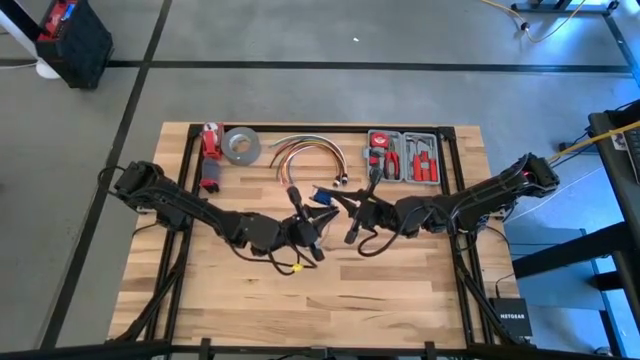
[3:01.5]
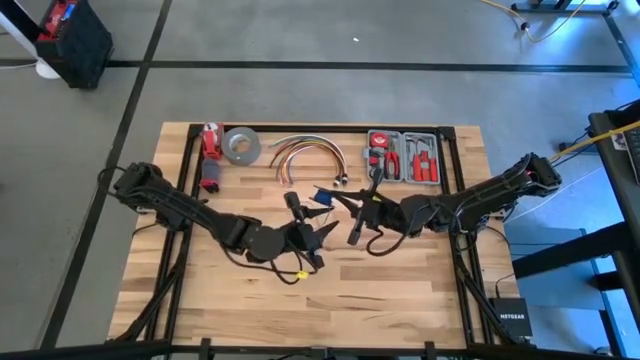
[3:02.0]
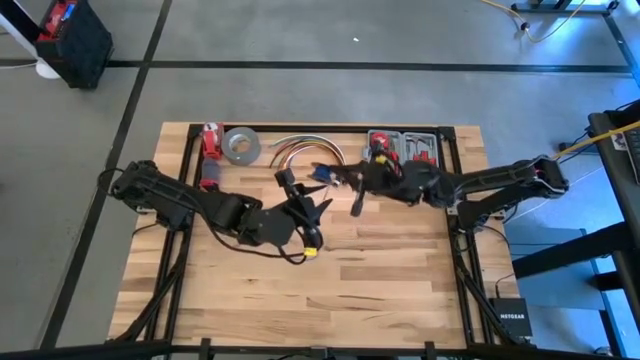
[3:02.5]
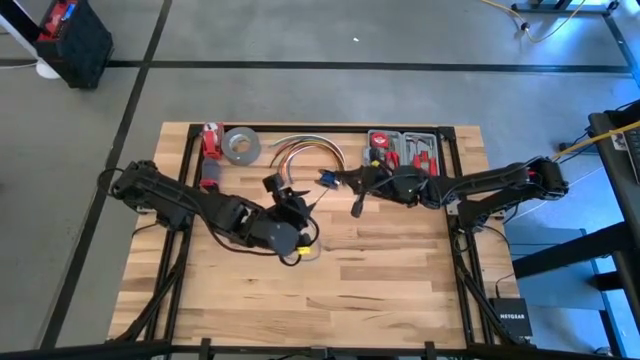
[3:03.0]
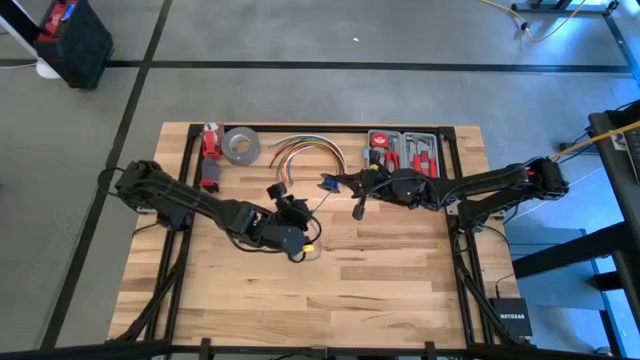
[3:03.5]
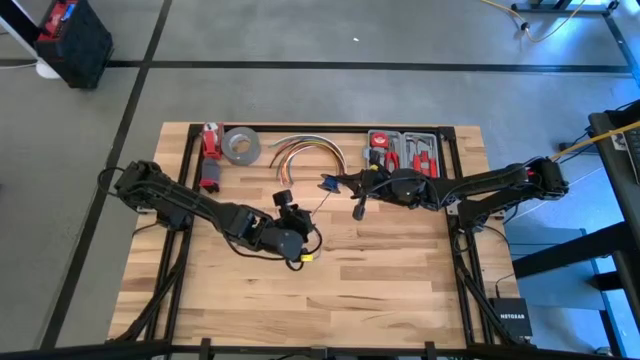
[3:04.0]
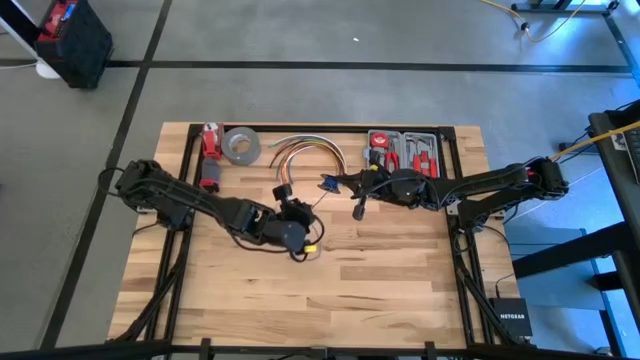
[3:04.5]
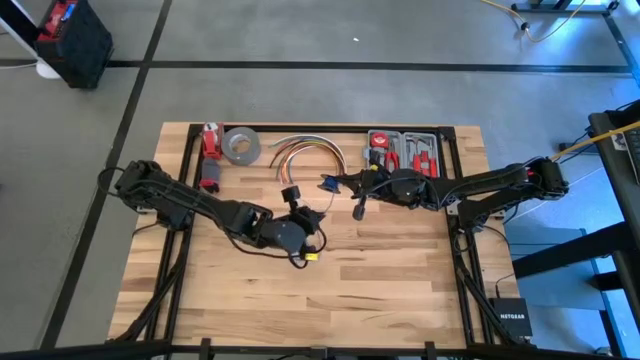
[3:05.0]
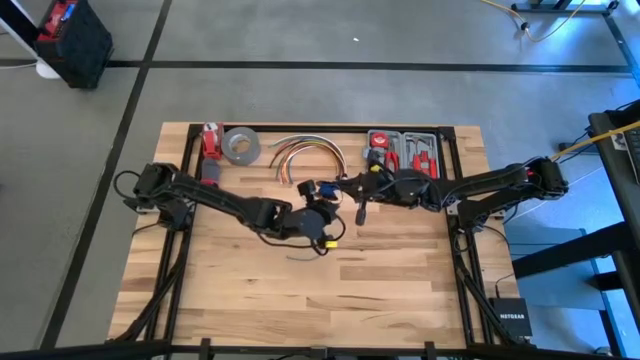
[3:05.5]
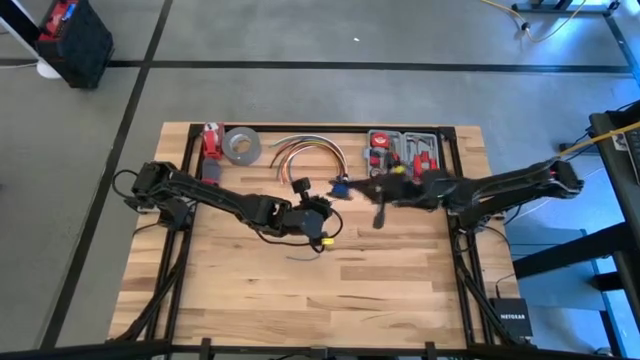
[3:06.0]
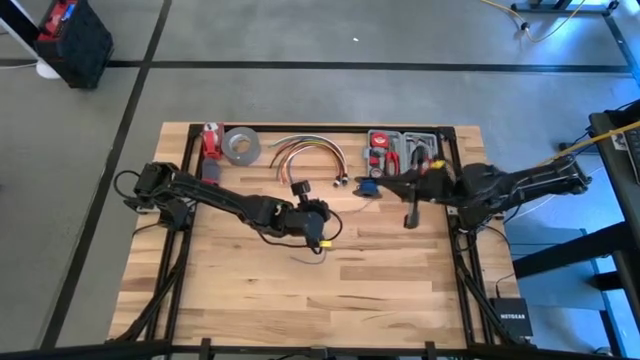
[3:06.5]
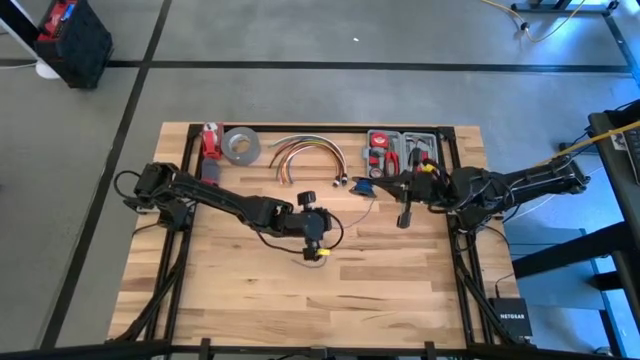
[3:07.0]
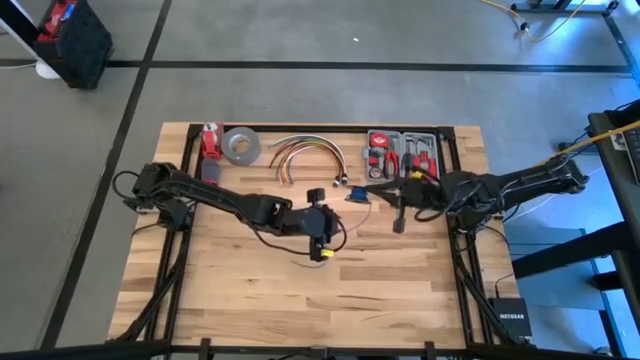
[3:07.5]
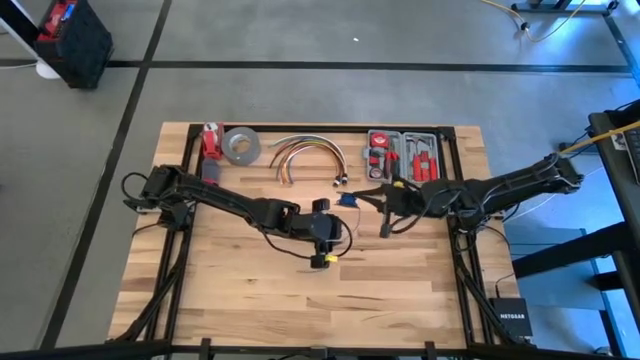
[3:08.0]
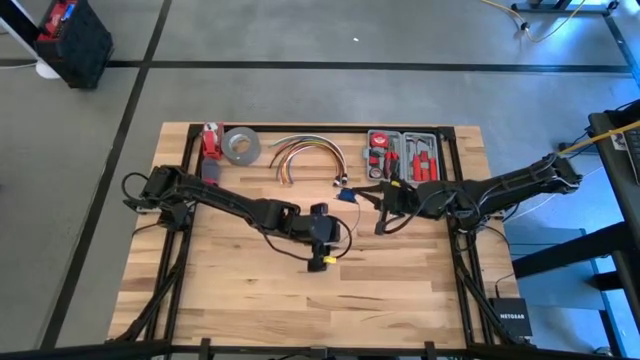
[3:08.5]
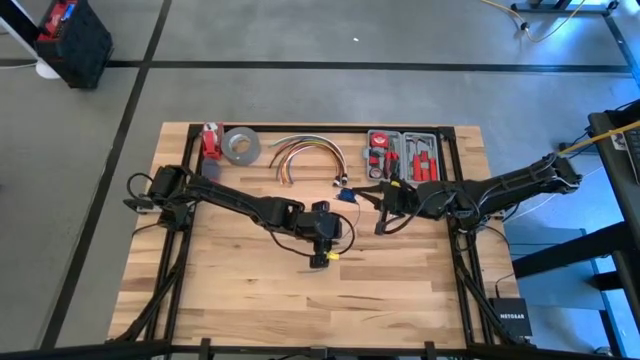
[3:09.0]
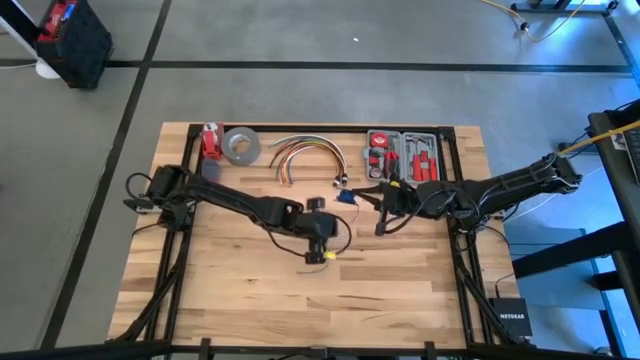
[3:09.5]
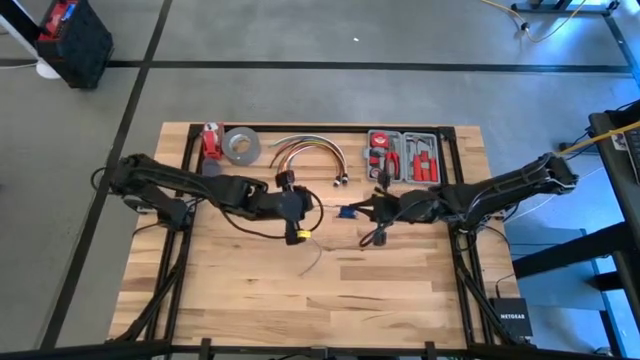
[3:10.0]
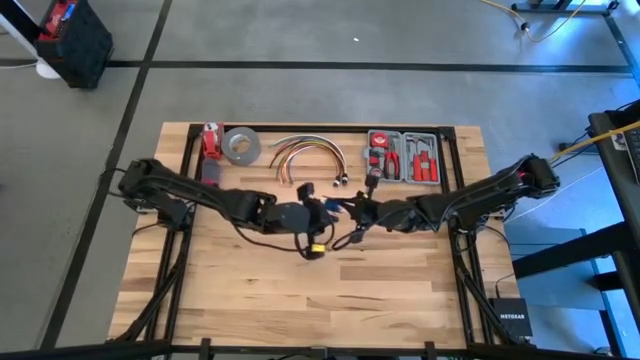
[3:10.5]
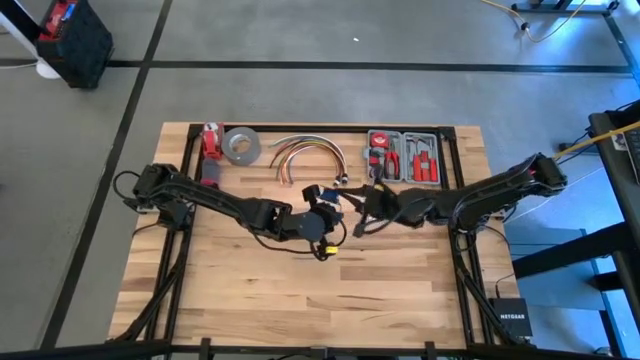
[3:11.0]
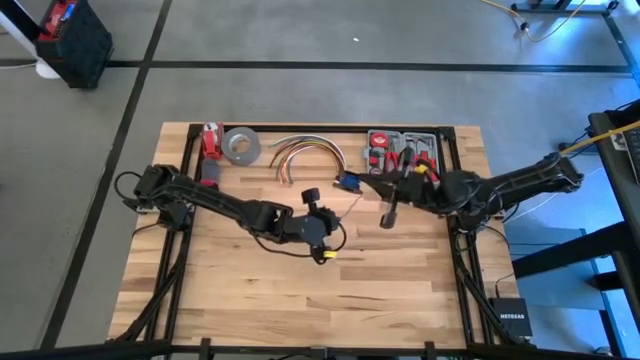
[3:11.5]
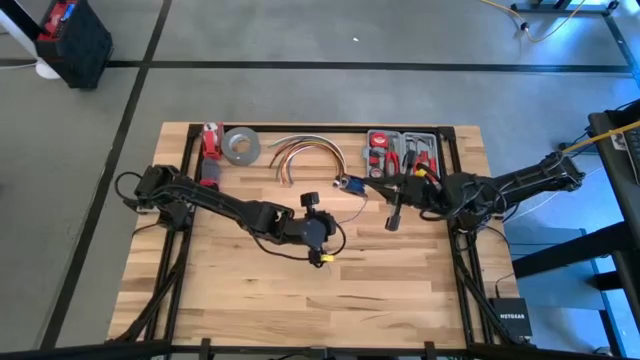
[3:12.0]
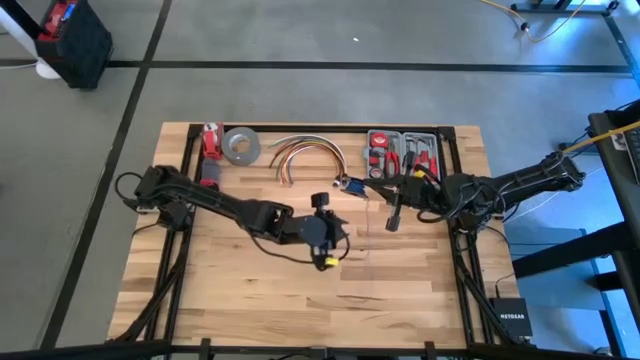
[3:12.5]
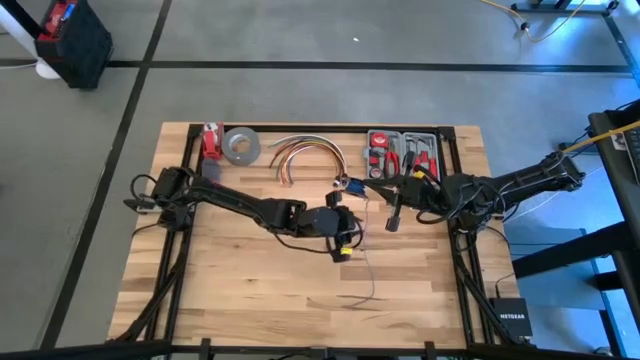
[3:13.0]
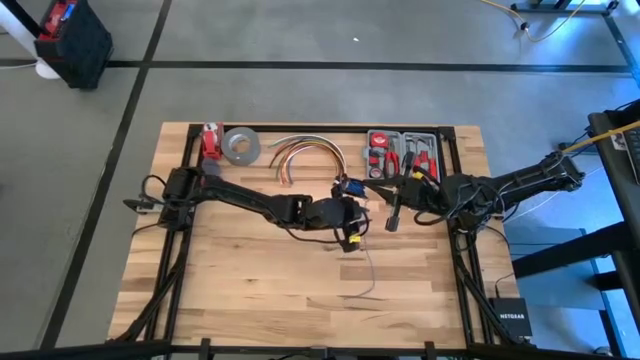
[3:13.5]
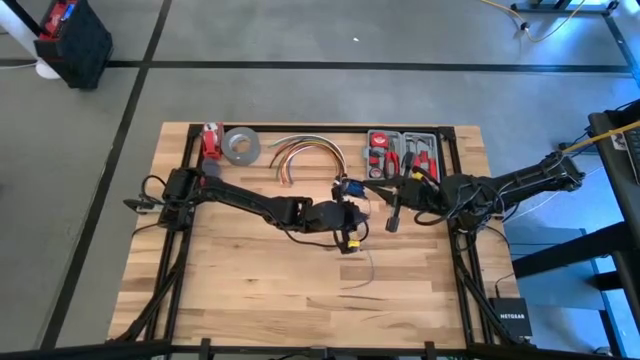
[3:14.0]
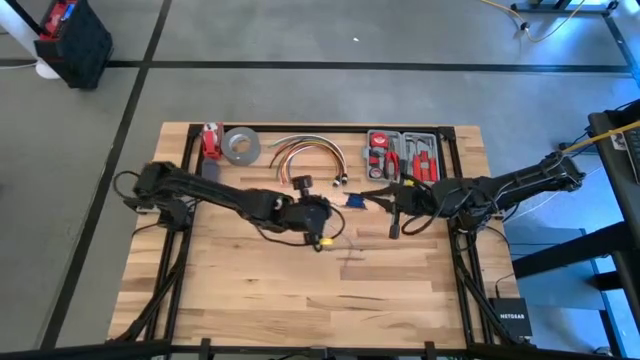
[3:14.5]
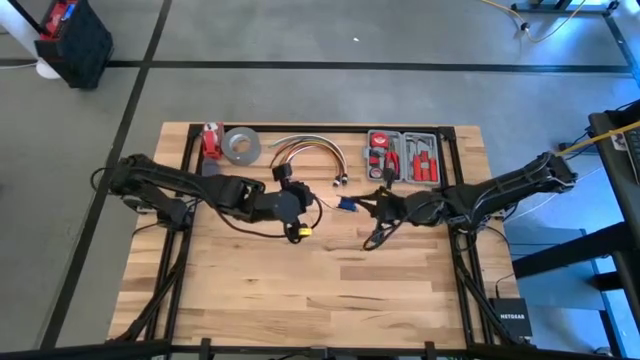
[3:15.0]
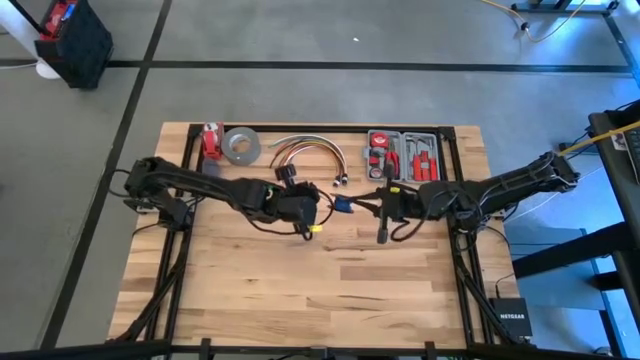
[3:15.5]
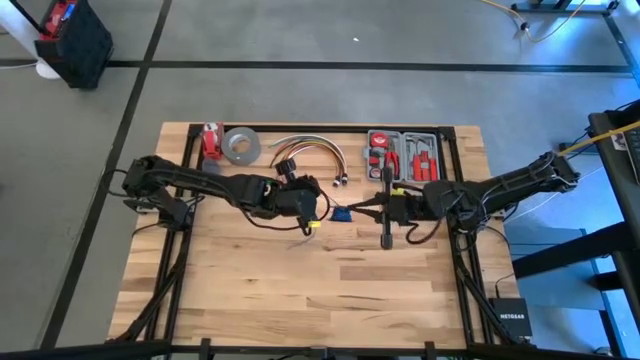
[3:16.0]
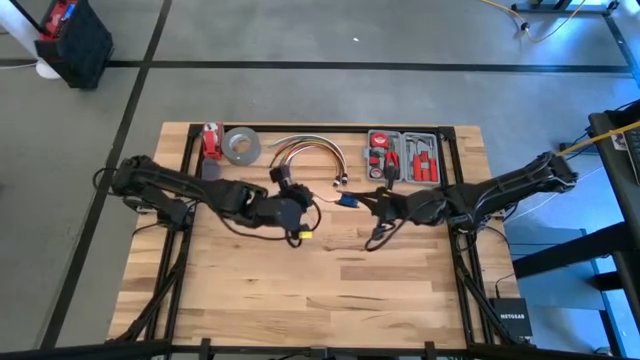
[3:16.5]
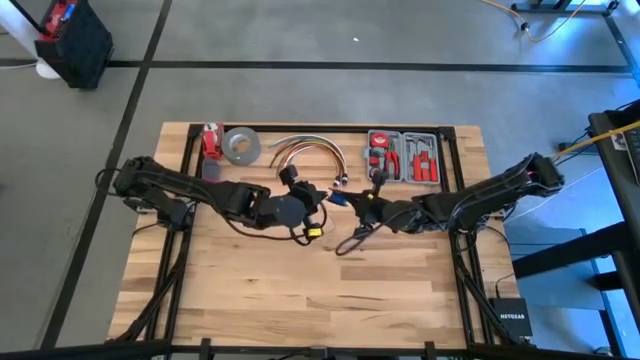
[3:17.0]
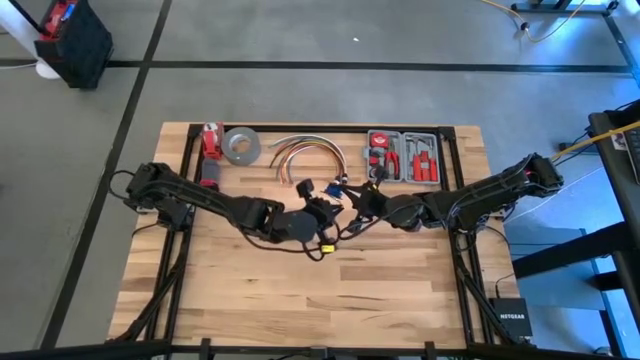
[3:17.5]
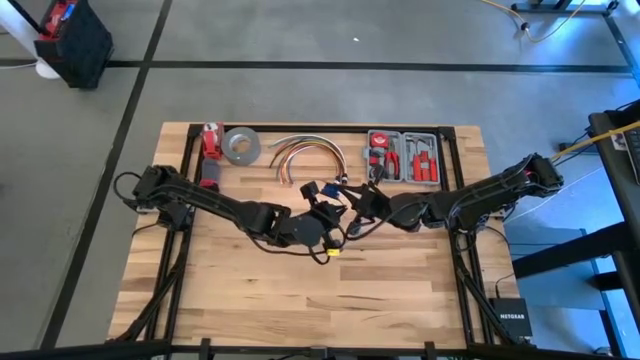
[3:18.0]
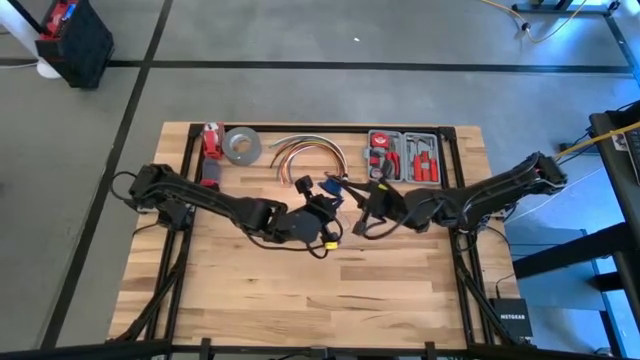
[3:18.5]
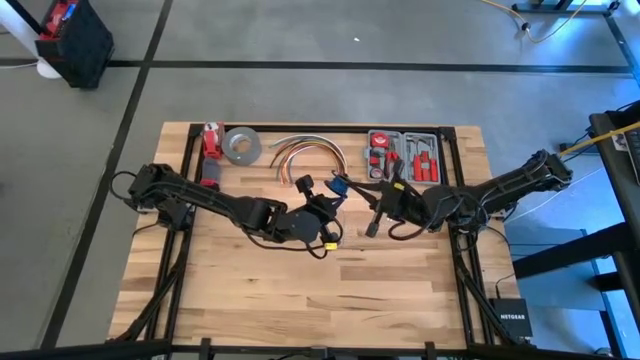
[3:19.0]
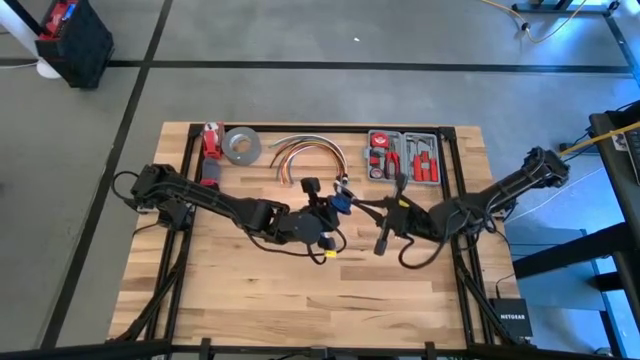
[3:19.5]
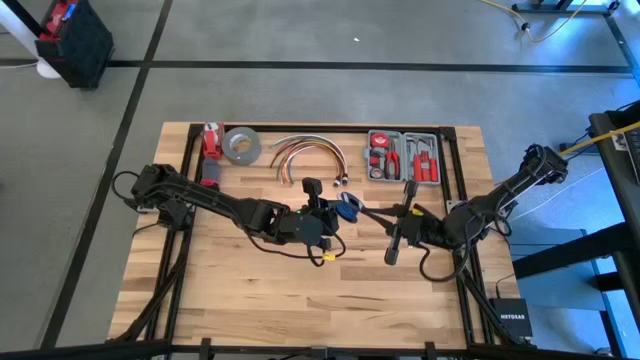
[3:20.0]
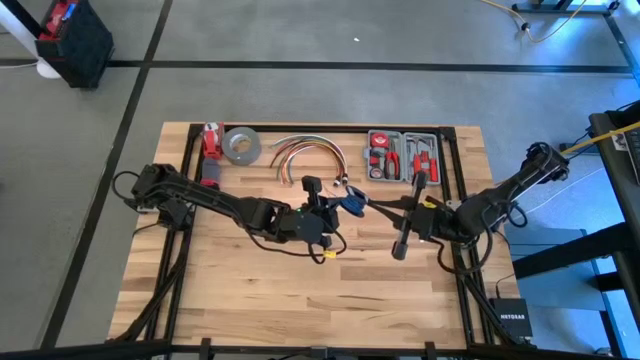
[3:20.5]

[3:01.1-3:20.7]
Task: Coil cords
Coil the blue wire on the black spool

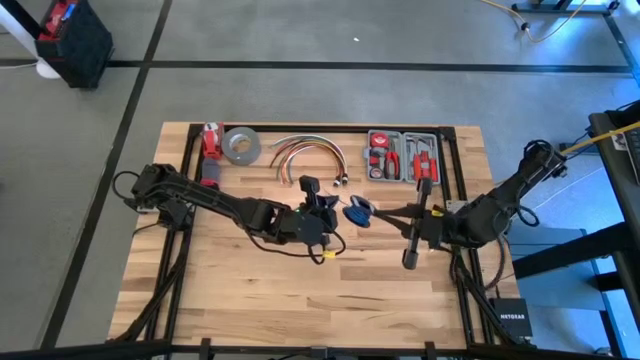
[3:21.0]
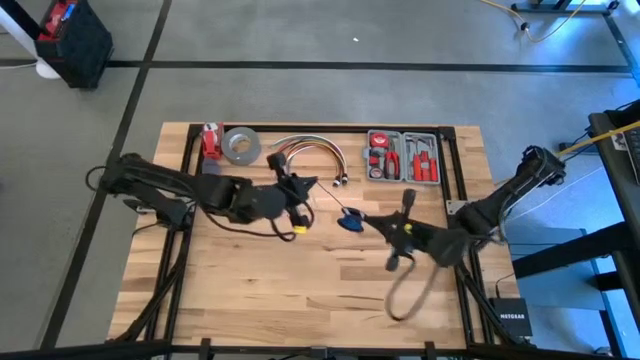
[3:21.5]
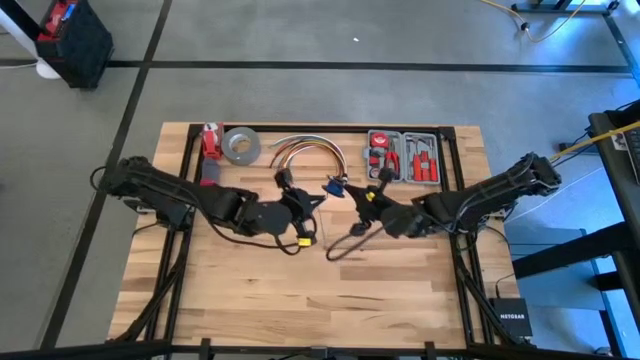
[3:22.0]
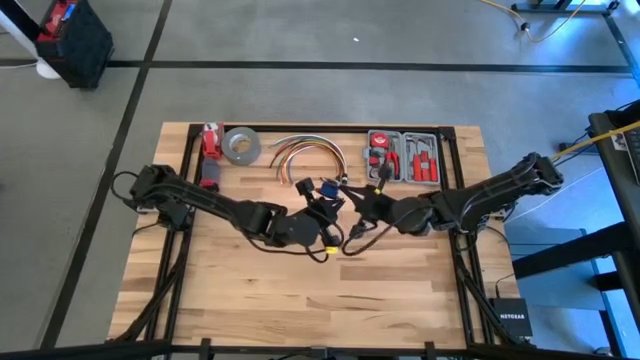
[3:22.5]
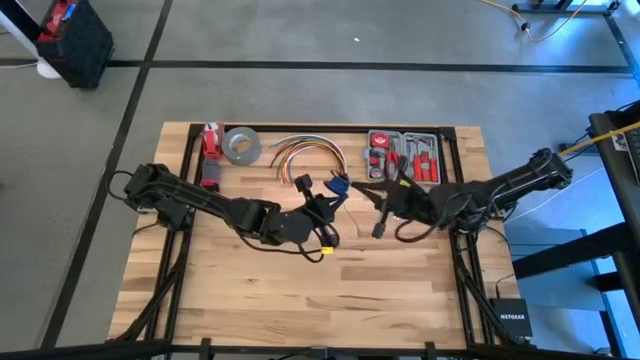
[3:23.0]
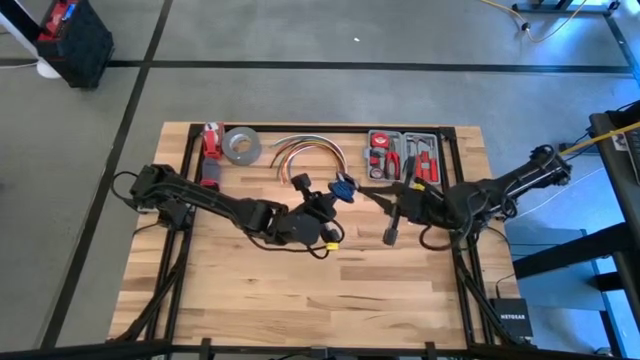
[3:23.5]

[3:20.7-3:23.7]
Coil the blue wire on the black spool
